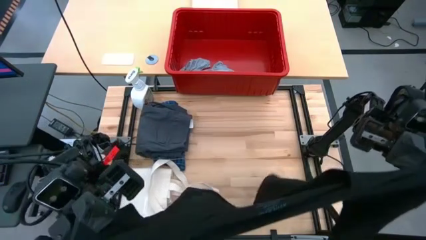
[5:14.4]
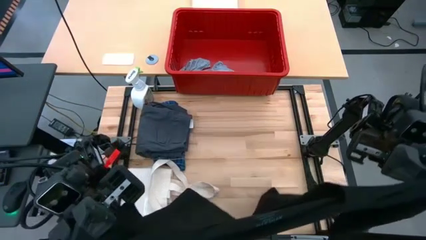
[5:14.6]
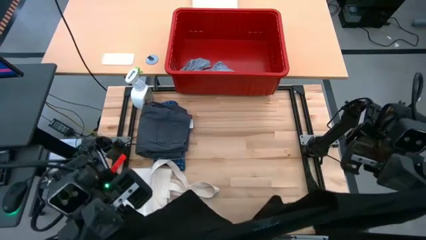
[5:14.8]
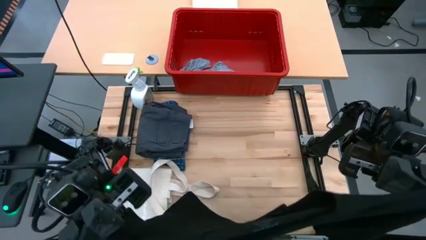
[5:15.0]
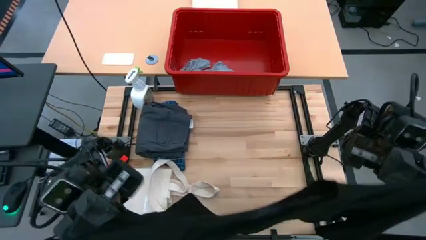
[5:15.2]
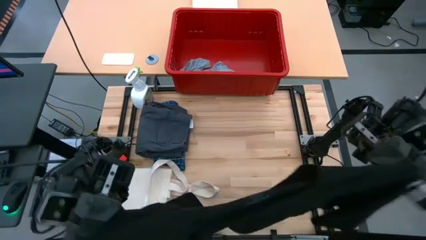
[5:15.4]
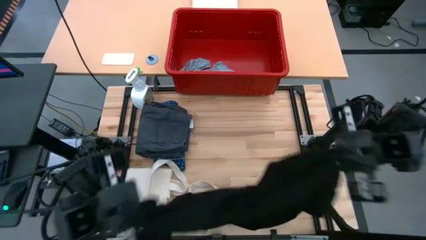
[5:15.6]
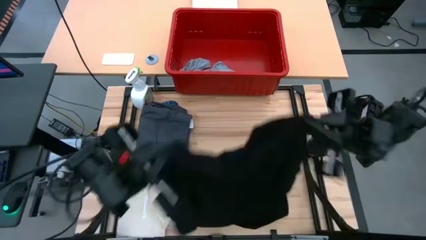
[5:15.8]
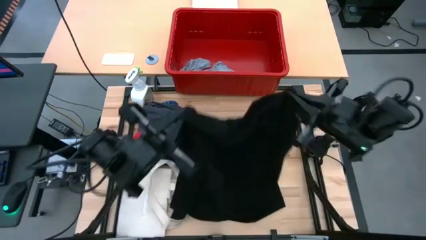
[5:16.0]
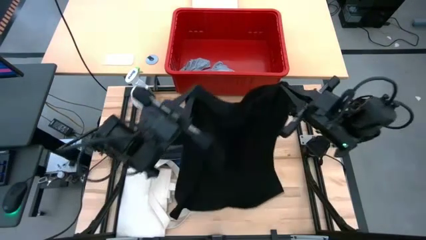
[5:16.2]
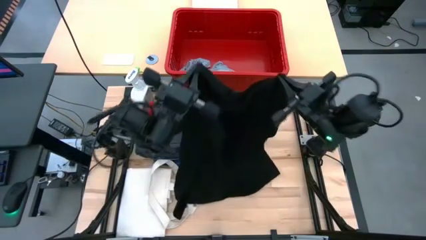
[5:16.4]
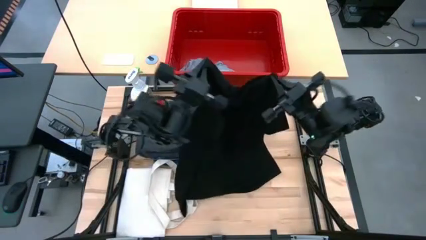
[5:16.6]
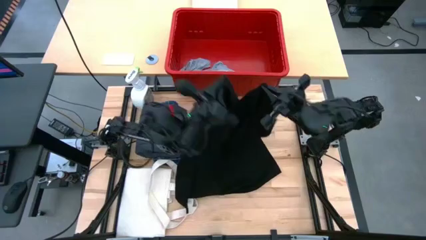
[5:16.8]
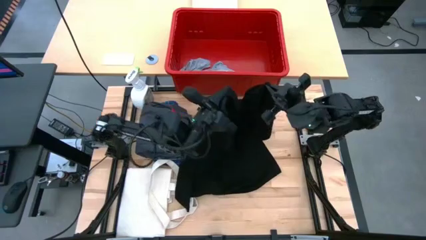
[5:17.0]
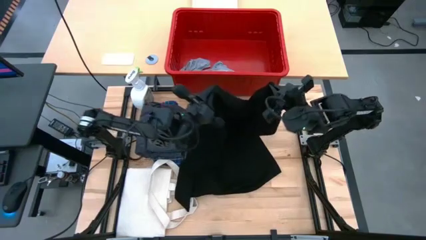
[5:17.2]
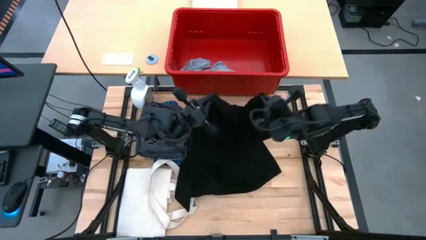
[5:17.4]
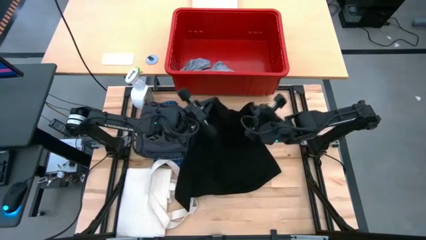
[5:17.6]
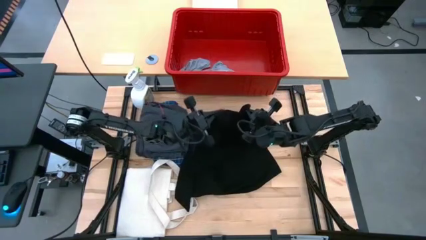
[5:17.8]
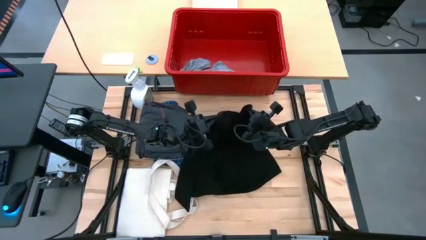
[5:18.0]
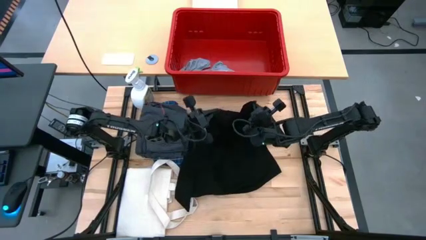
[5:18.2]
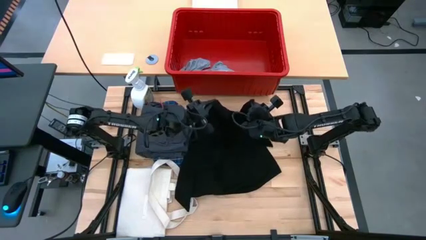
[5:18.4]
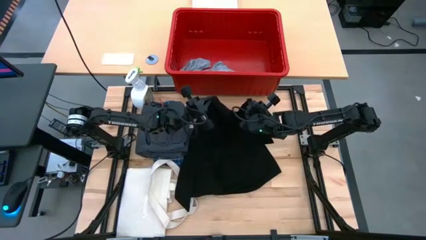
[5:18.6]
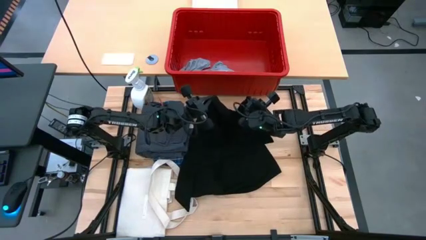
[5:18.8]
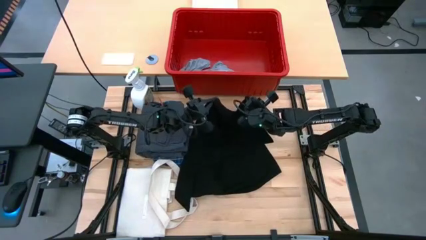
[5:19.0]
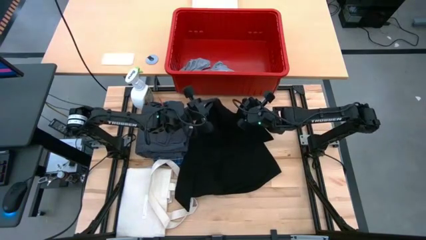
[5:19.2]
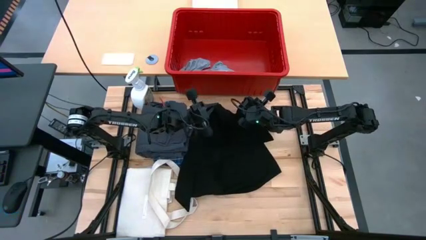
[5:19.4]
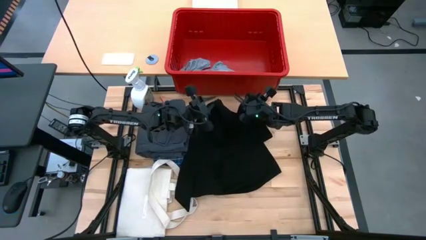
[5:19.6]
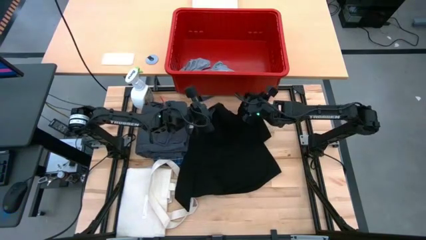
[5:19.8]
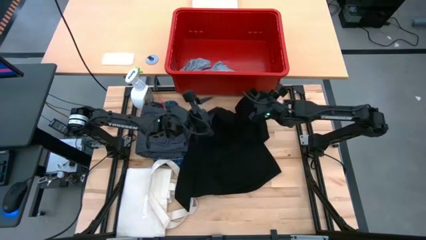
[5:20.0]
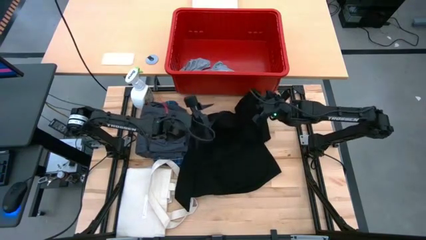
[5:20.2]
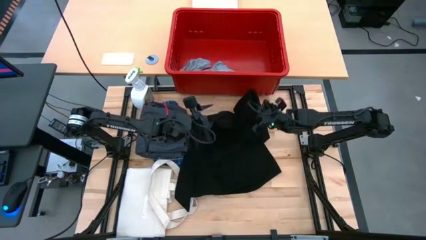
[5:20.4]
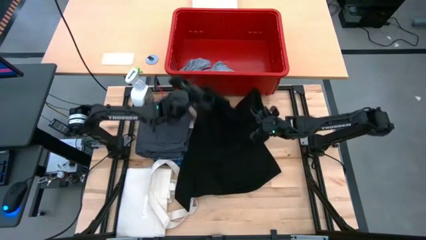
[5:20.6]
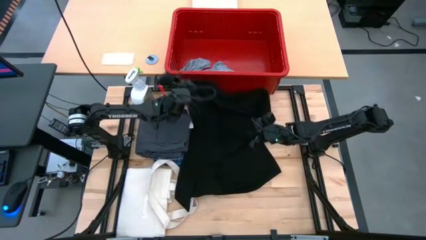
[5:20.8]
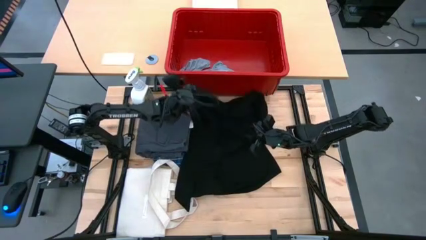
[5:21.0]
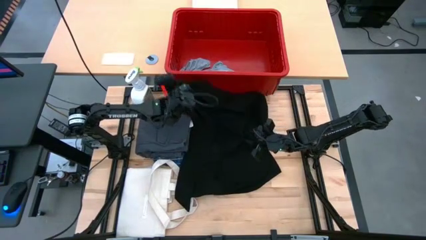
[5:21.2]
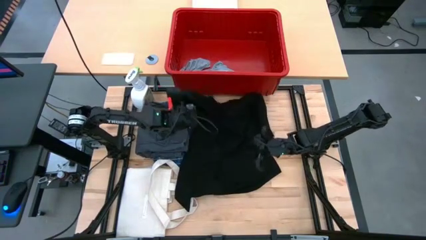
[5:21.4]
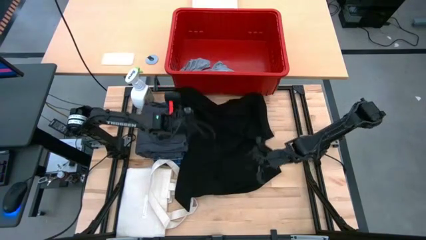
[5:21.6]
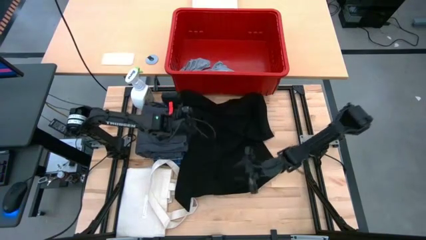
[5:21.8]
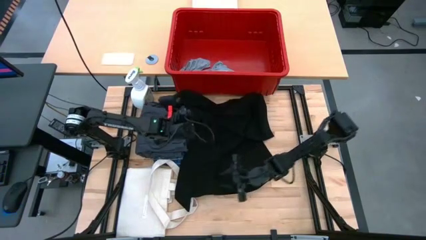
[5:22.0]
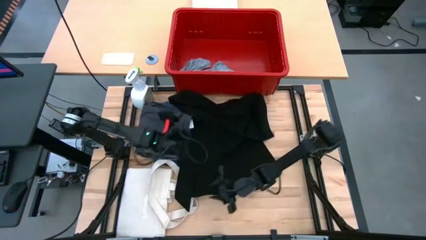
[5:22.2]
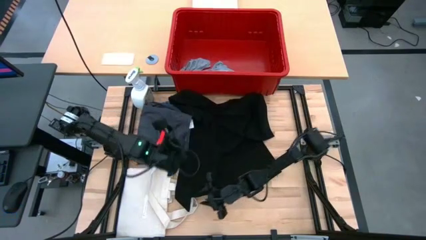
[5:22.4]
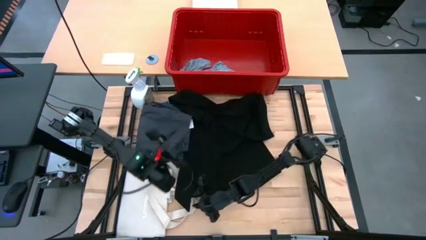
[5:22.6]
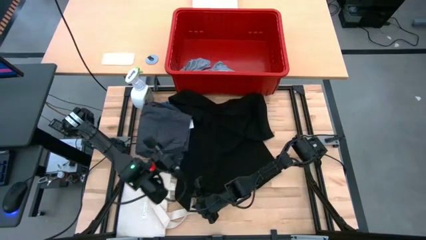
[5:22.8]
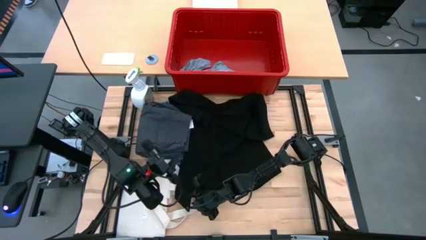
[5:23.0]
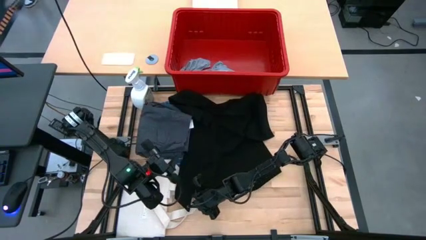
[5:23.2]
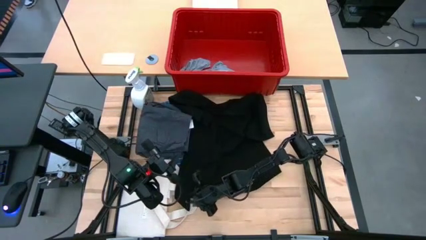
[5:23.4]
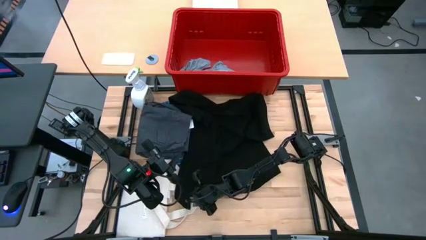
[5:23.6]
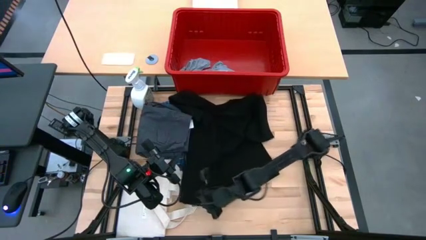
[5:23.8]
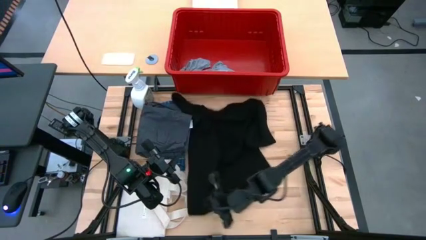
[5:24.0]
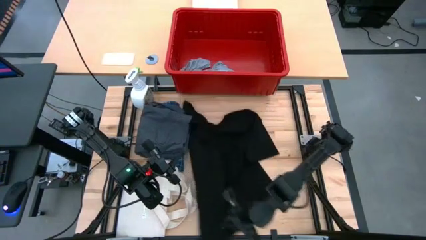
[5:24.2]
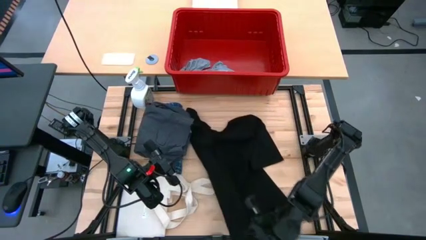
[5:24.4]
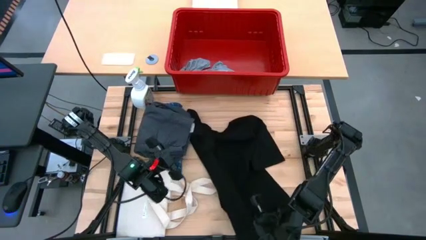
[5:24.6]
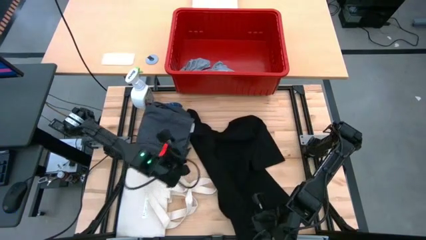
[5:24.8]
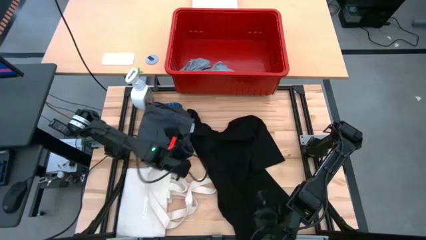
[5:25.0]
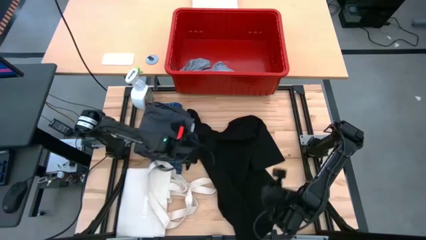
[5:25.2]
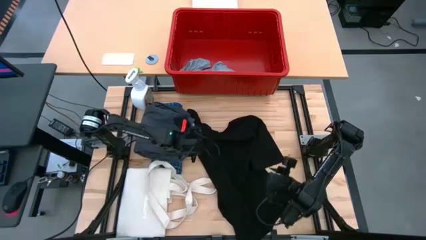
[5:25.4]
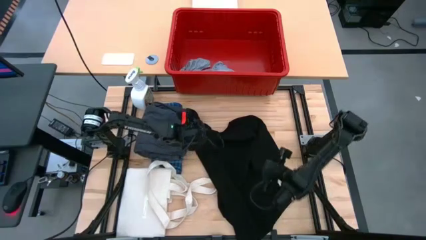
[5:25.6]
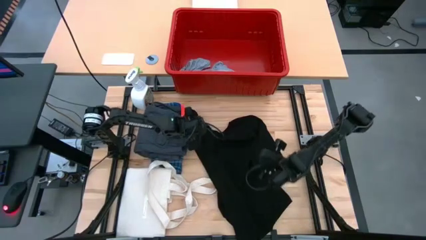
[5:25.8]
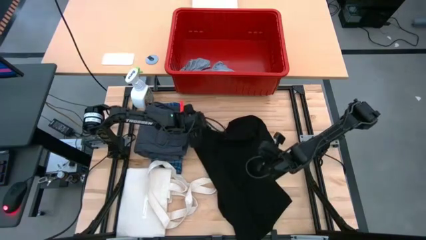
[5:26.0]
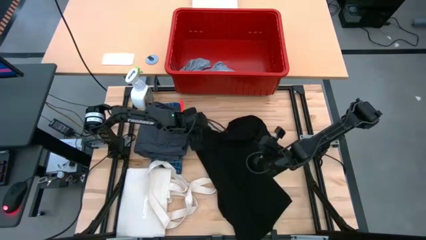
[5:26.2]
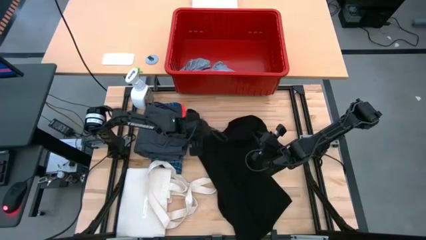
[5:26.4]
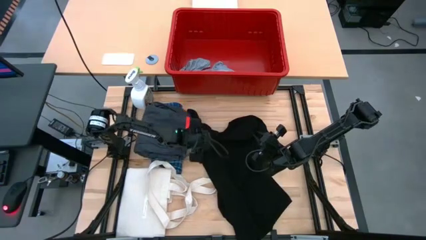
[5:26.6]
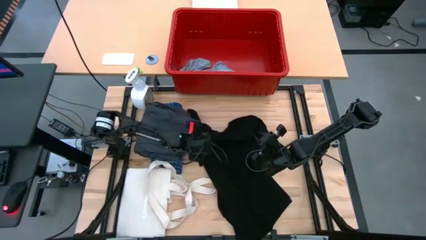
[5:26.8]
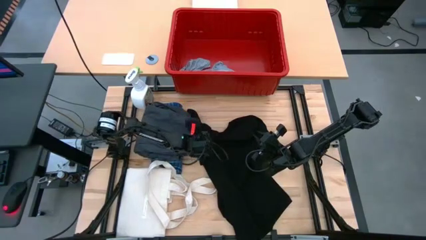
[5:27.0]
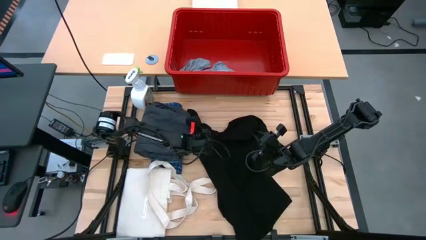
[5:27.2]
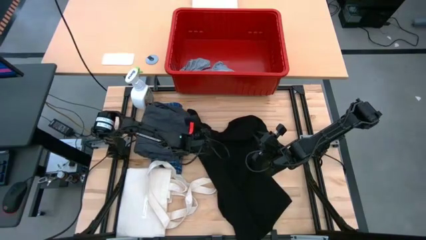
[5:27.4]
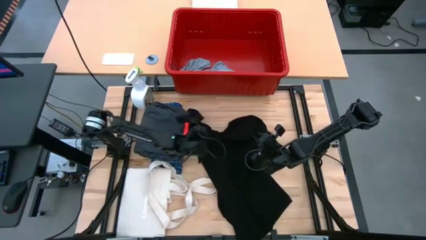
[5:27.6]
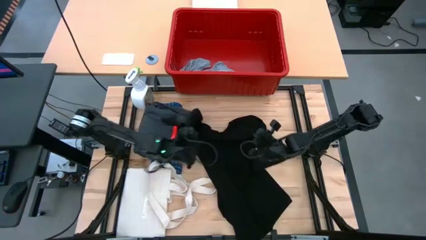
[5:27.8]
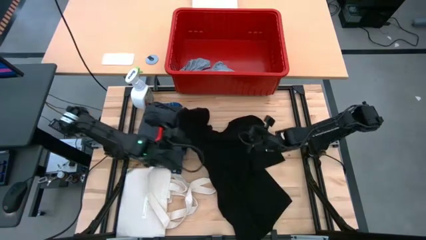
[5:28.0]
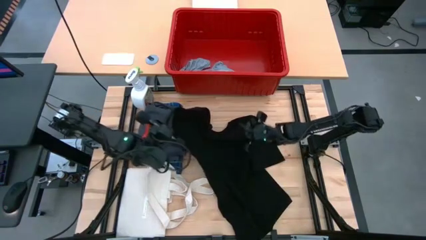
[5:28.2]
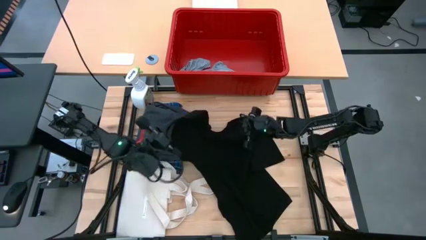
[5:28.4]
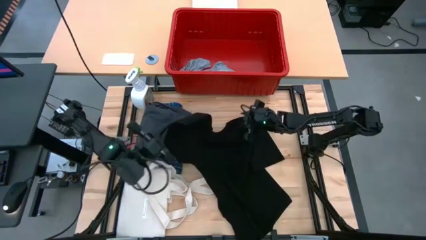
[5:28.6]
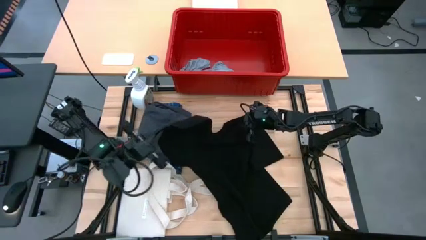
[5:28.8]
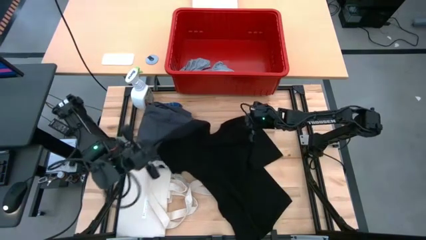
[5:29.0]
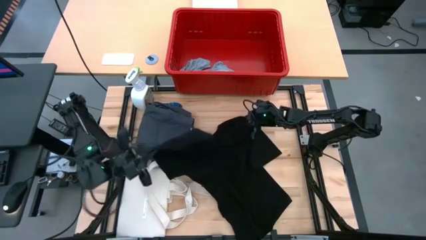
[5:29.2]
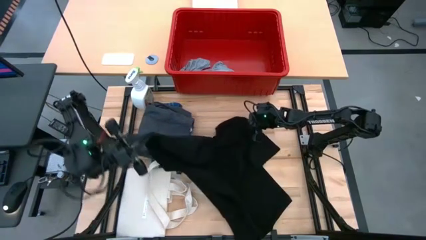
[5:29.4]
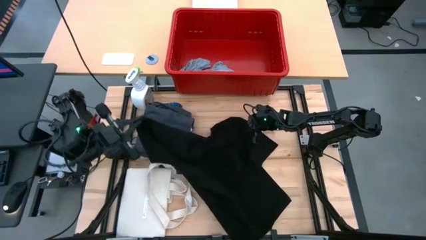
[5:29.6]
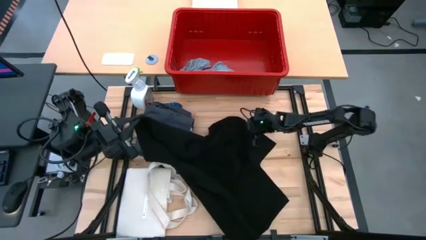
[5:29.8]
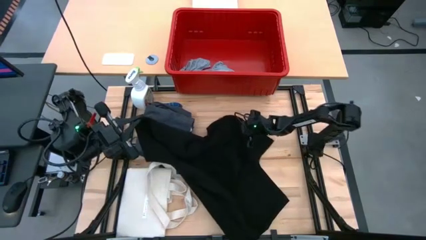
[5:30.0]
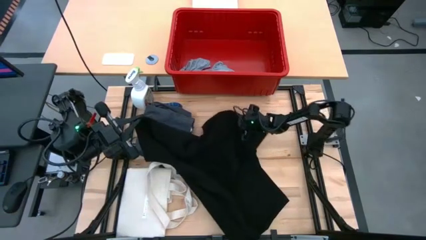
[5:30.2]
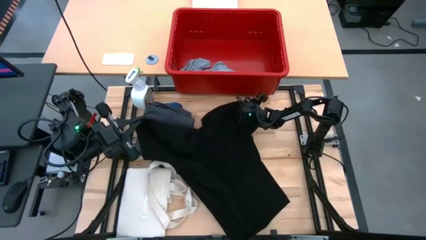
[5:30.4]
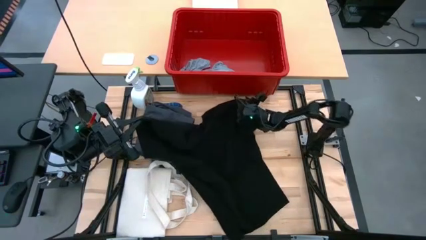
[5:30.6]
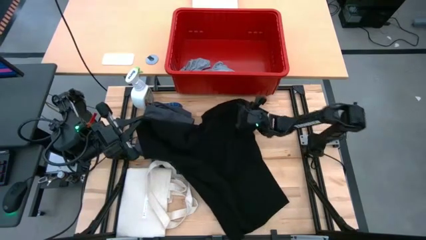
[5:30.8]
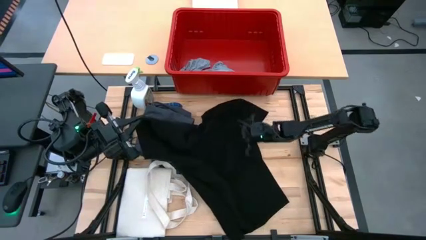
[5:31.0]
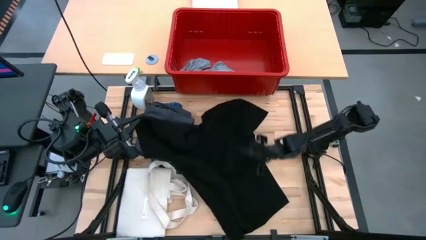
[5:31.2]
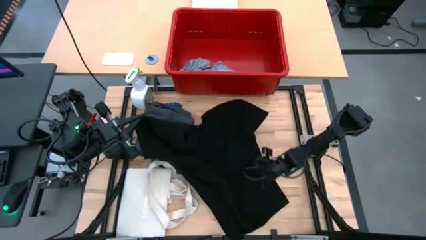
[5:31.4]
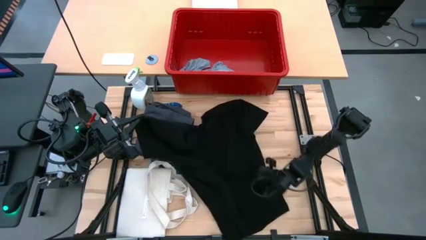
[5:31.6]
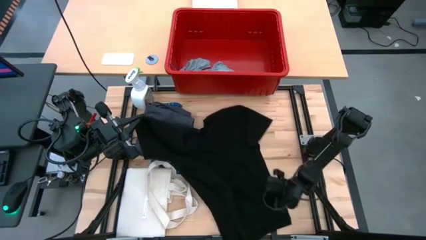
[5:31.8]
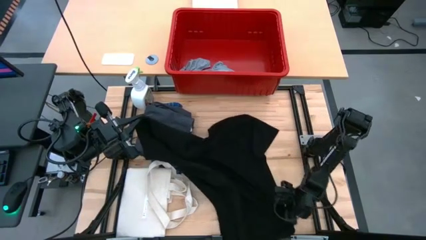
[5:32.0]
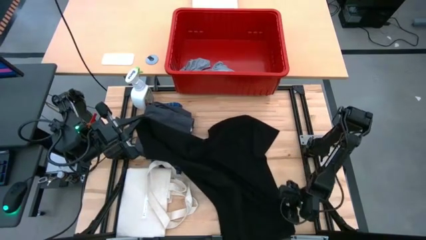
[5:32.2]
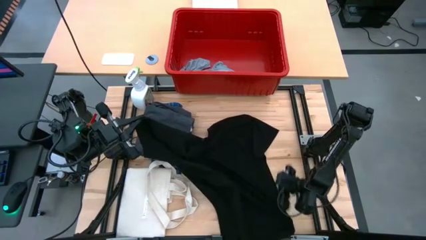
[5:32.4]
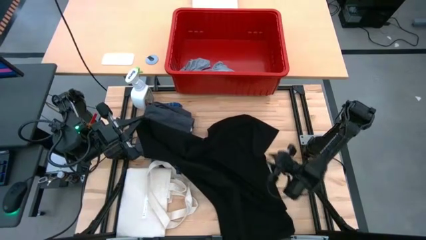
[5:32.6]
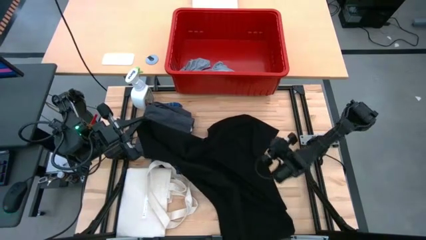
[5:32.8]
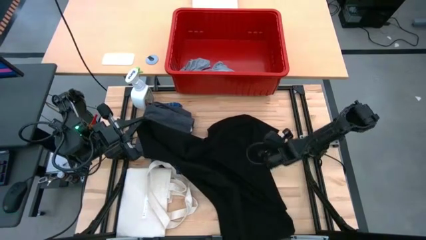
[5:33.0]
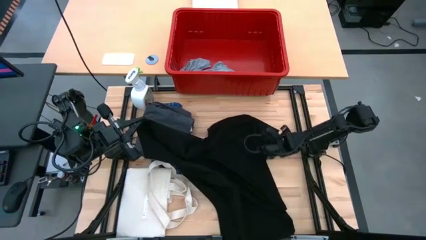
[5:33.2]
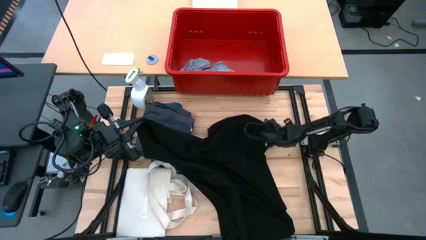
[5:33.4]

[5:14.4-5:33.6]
Task: Fold Laundry from Bin
Fold the black shirt
